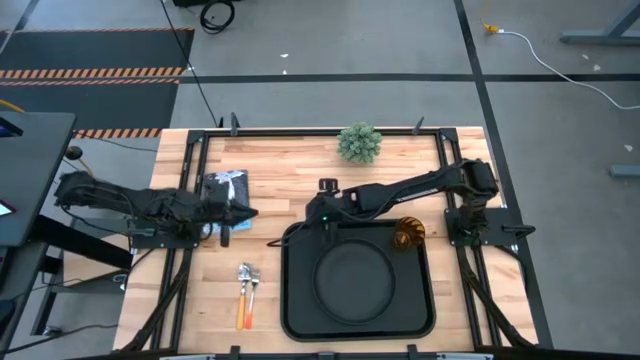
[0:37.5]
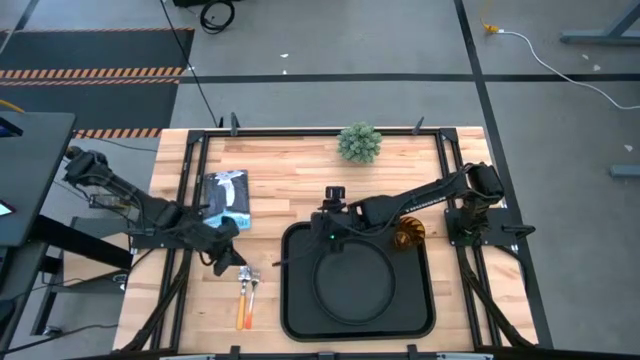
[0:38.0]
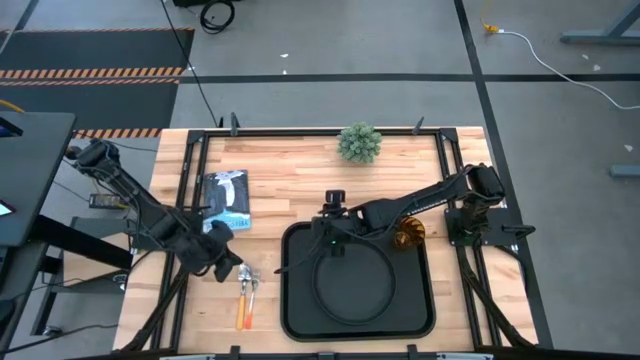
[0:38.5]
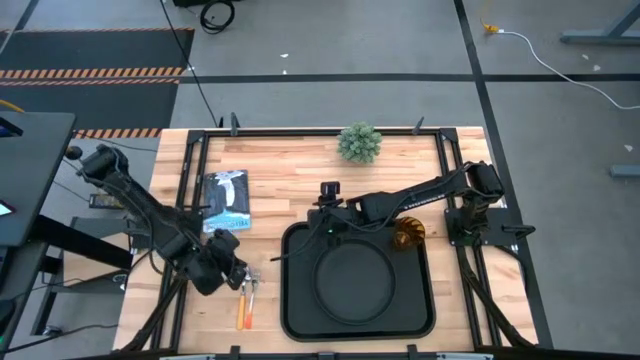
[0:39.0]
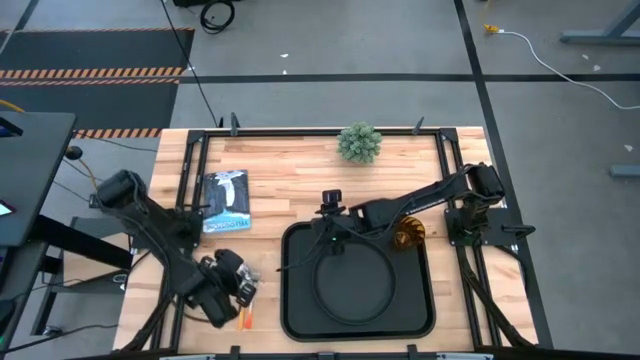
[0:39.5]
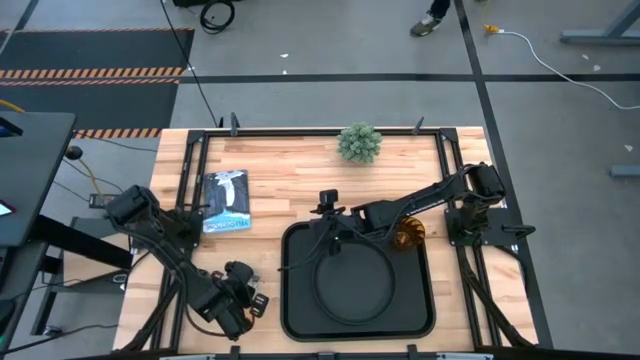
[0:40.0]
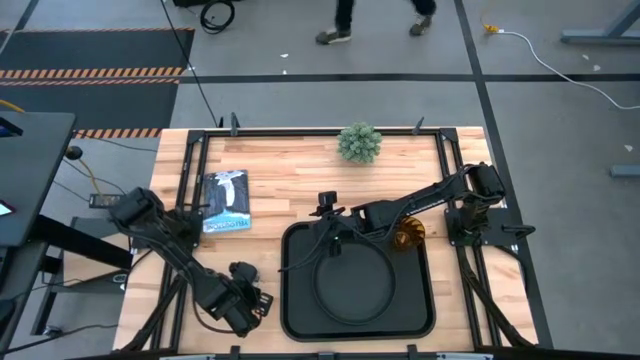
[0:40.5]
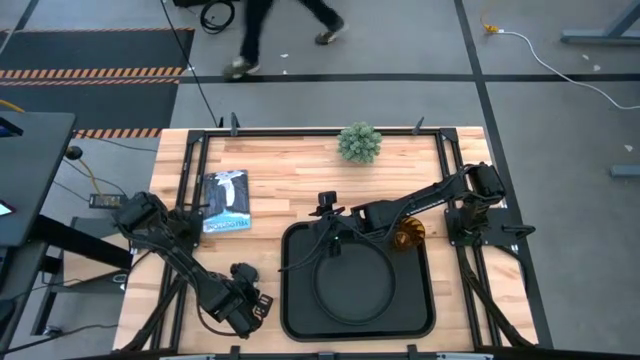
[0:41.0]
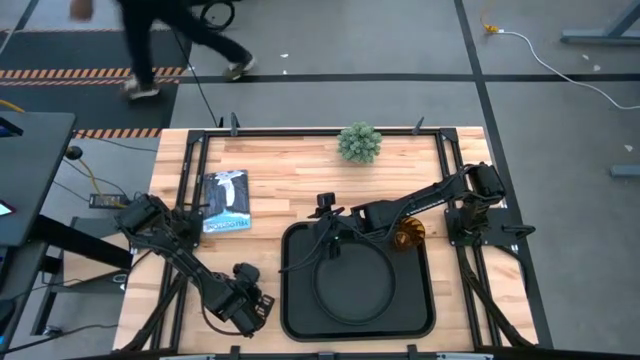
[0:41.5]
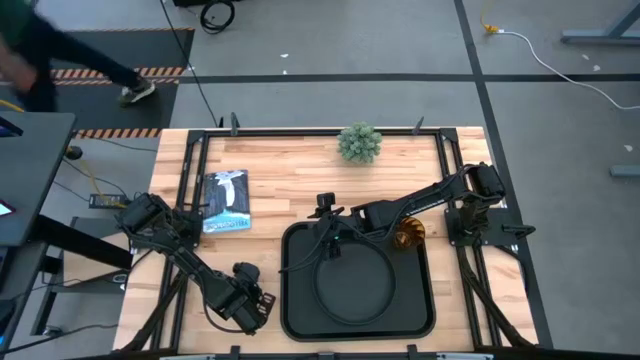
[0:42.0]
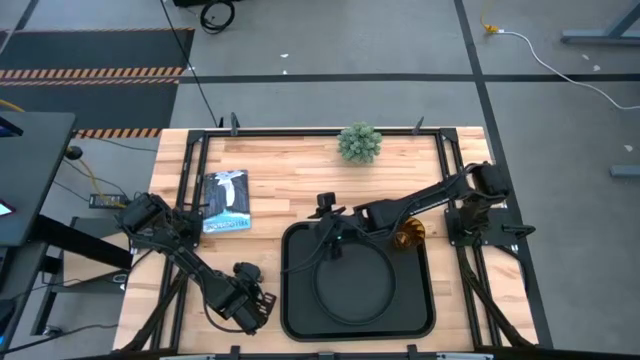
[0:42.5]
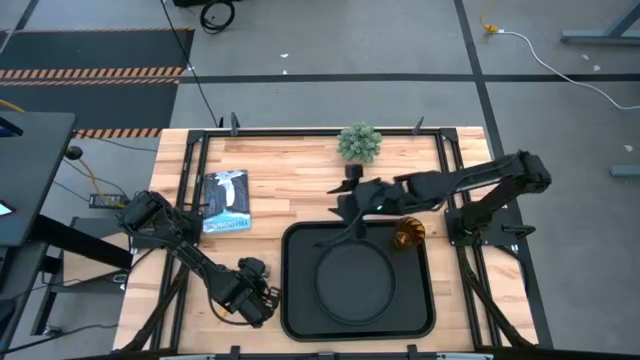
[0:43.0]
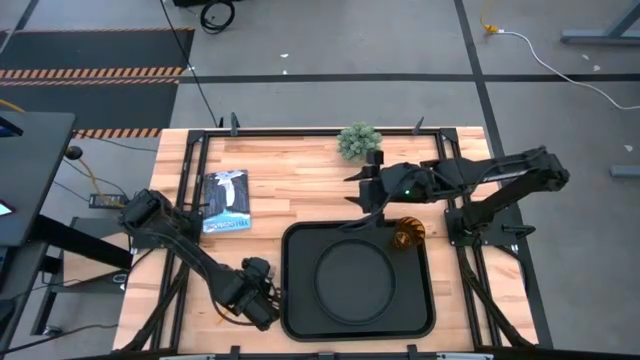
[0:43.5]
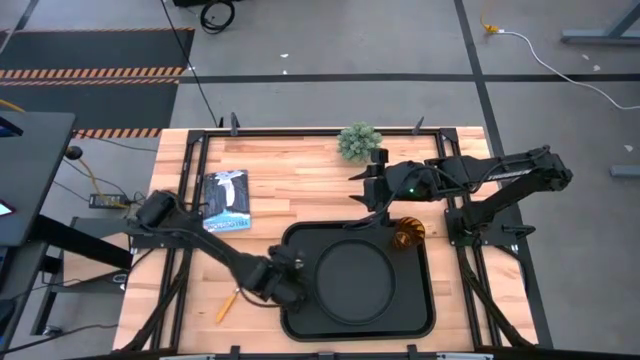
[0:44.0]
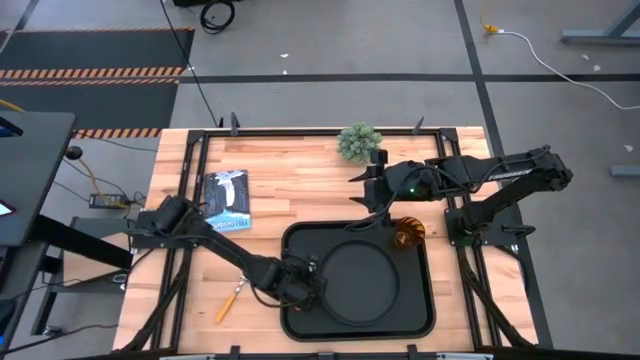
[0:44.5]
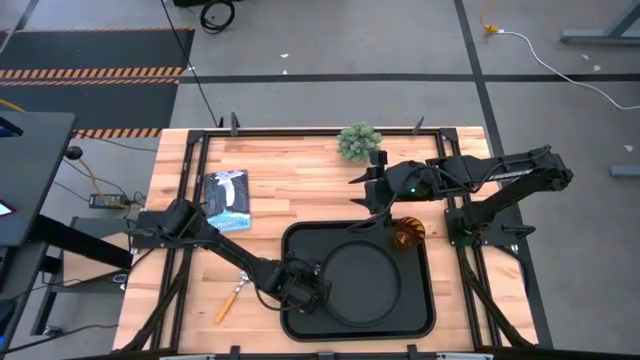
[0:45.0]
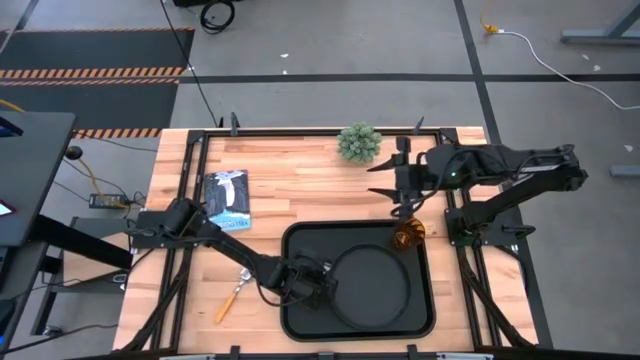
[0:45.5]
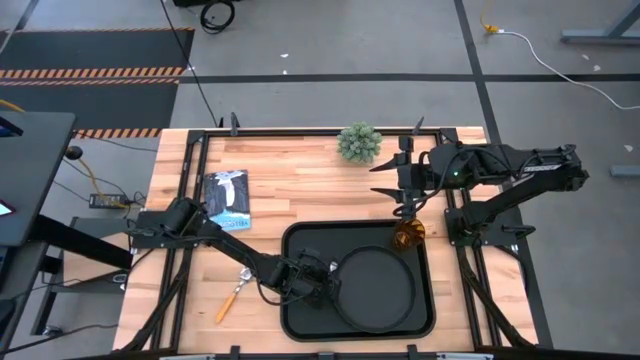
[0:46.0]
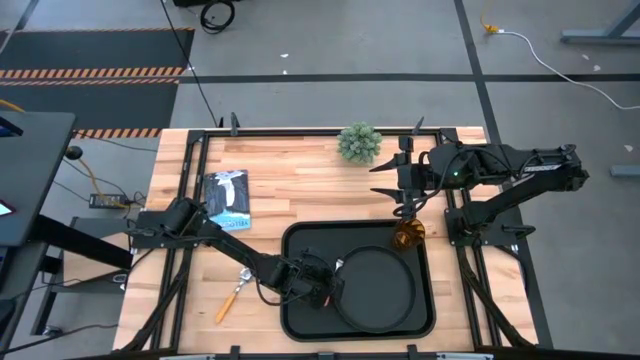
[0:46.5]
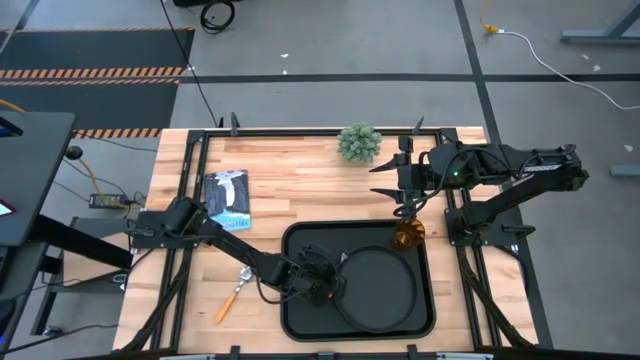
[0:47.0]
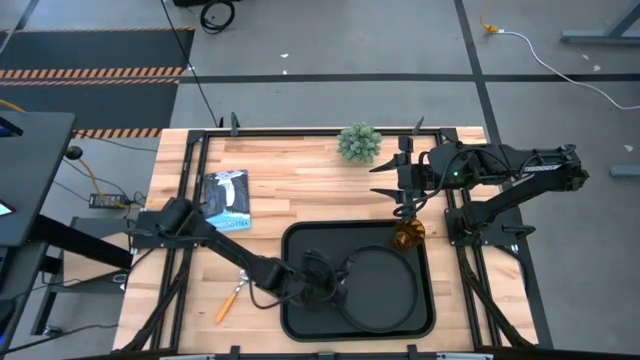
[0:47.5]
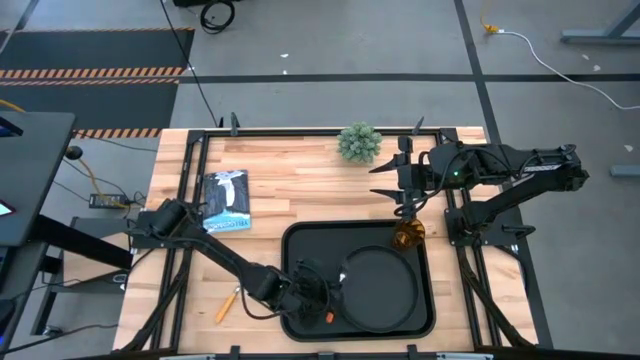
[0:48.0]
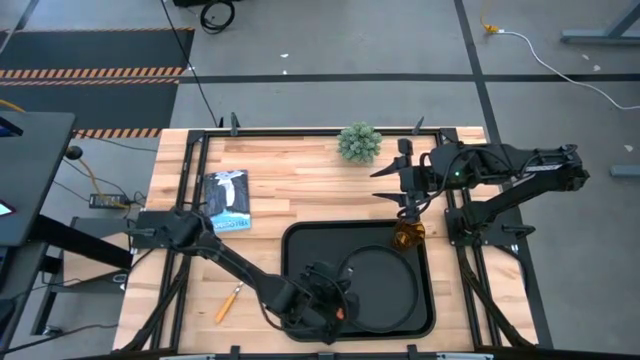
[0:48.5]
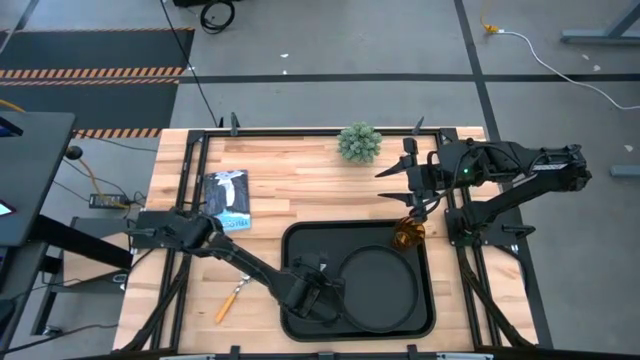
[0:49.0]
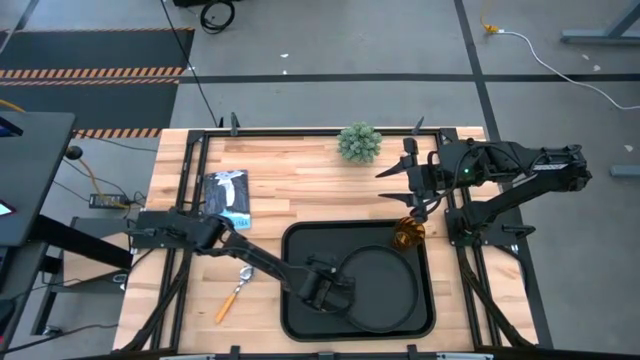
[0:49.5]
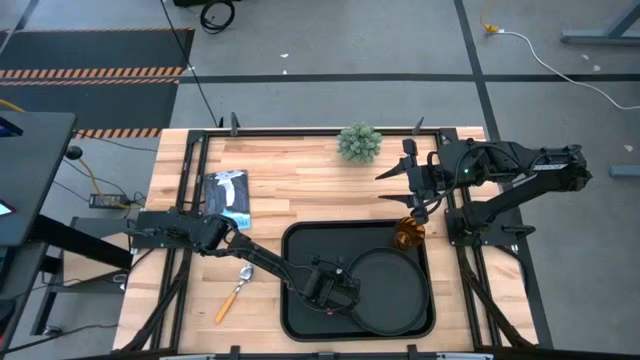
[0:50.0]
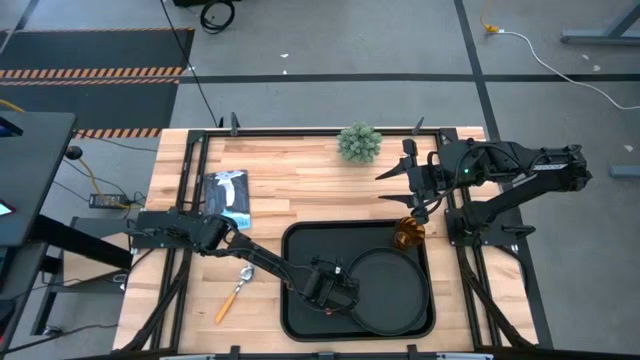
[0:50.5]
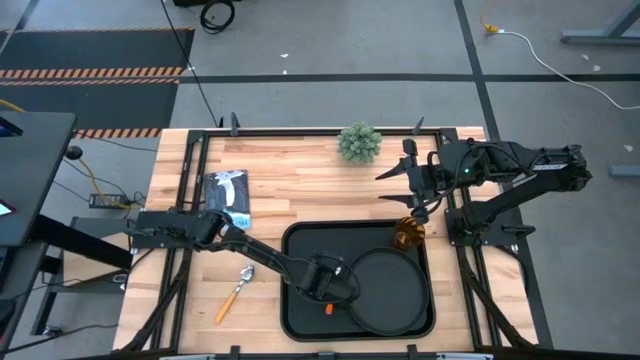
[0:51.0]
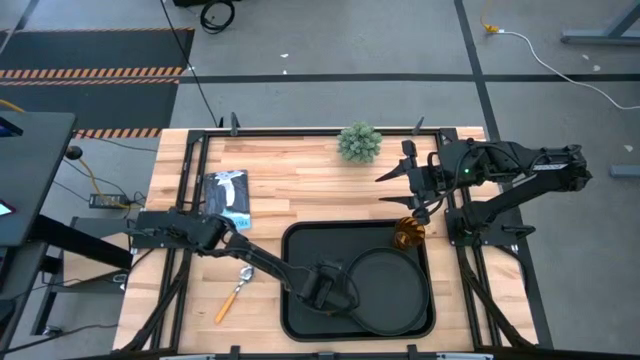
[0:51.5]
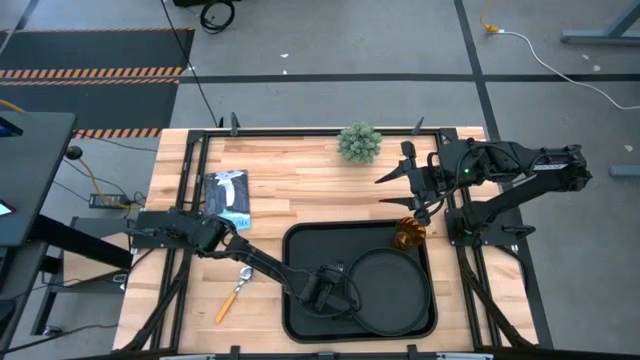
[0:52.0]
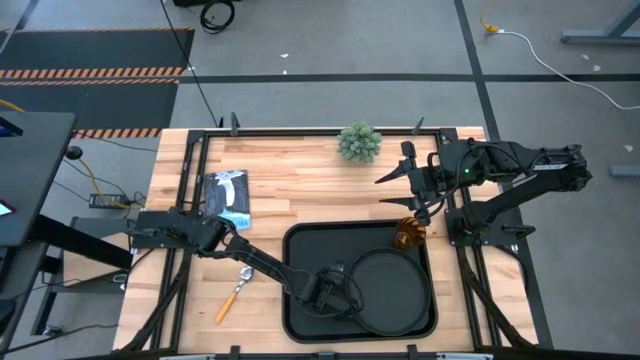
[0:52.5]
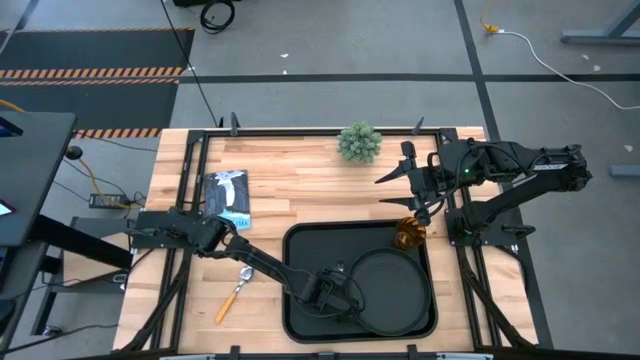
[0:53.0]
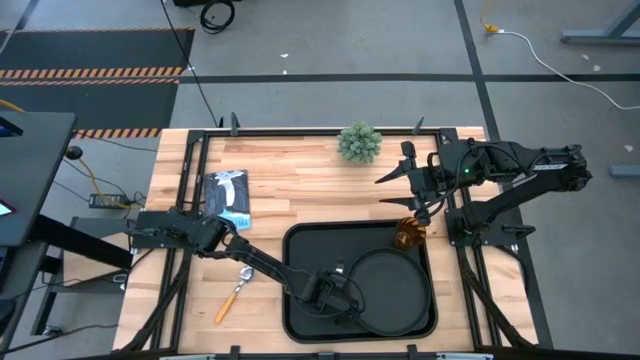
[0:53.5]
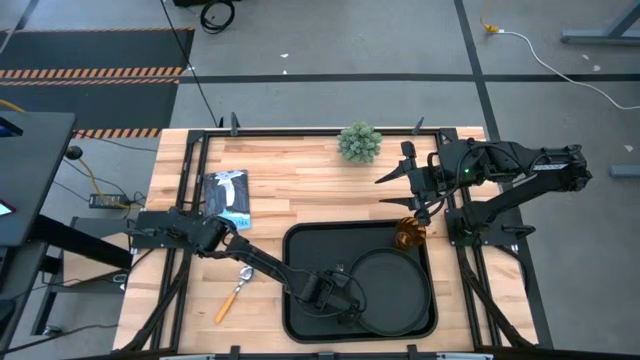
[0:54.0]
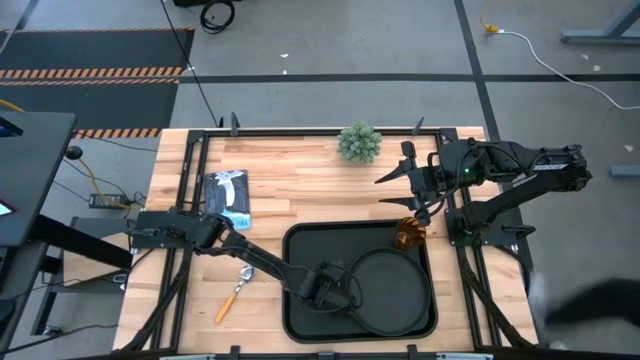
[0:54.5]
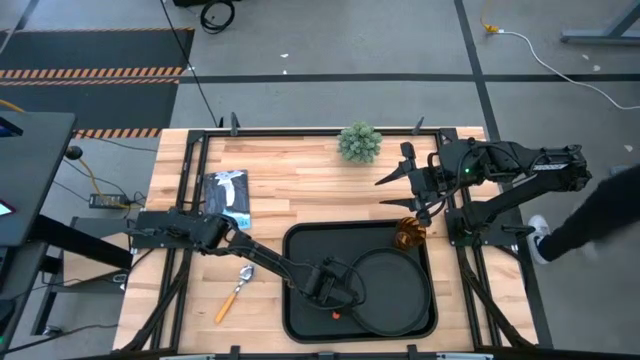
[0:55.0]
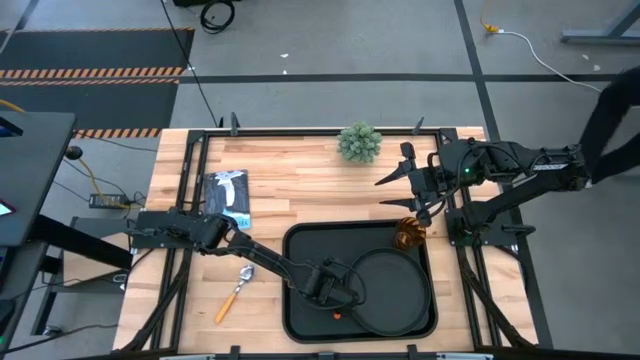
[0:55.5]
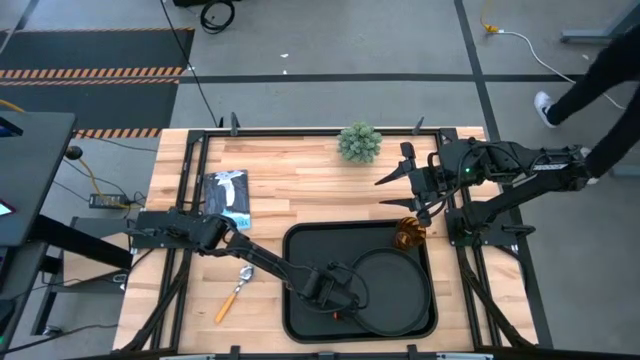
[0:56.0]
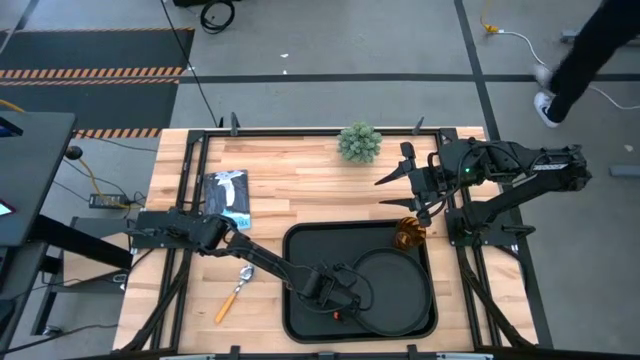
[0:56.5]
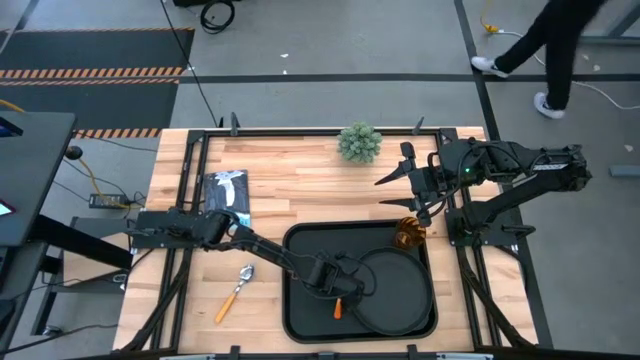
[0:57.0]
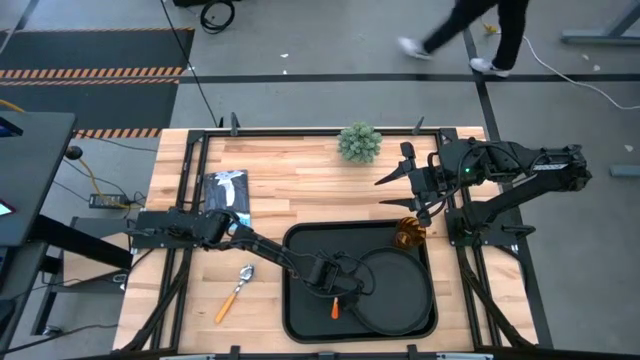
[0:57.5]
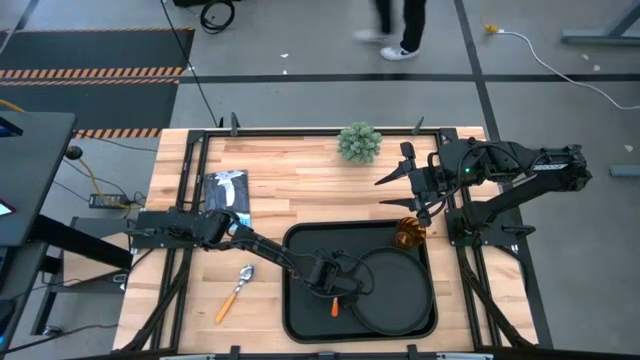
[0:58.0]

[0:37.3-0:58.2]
Task: Pick and place plate/cup/fork/spoon on tray
Put the orange fork on the black tray to the left of the black plate
